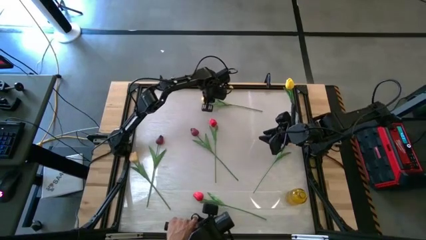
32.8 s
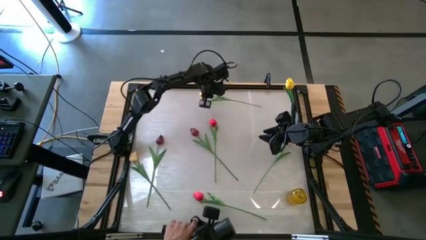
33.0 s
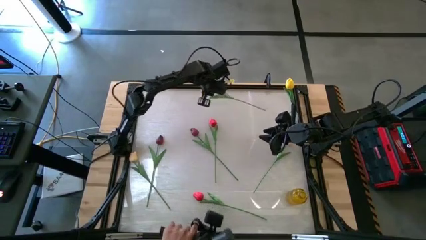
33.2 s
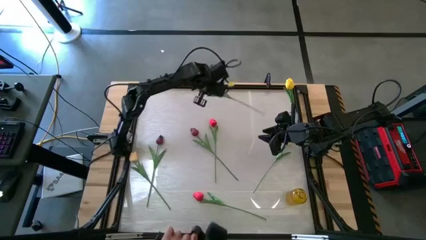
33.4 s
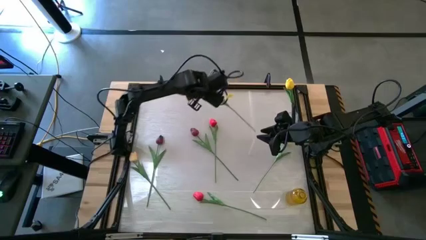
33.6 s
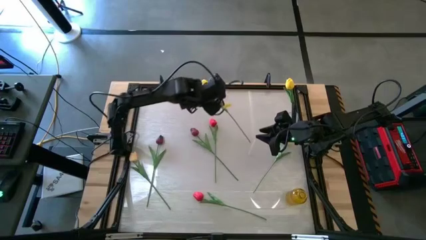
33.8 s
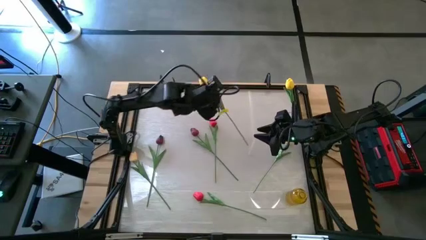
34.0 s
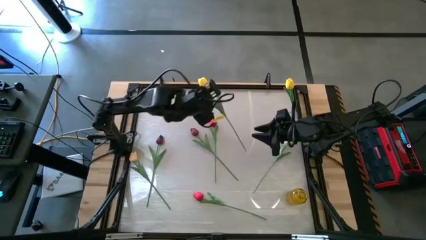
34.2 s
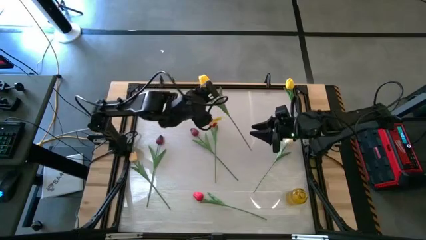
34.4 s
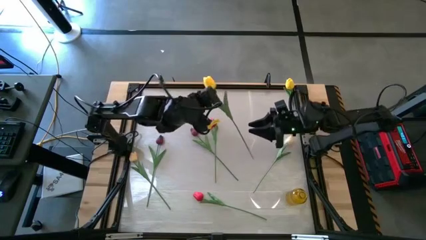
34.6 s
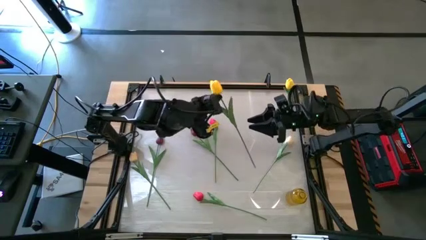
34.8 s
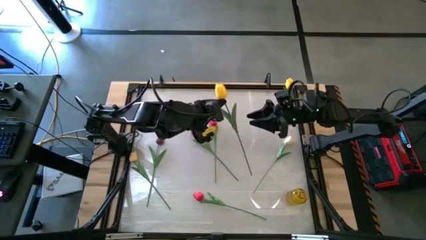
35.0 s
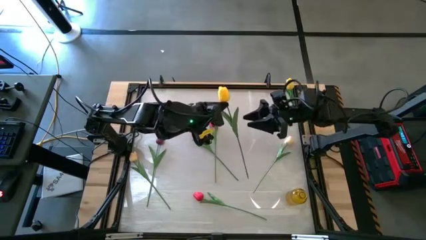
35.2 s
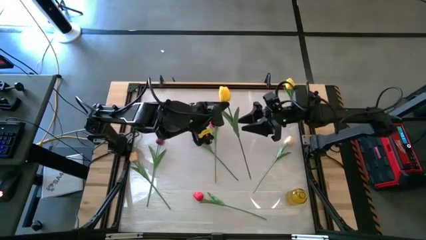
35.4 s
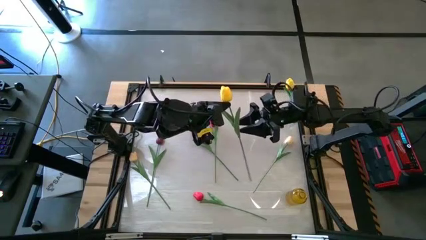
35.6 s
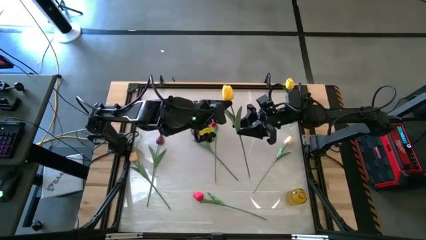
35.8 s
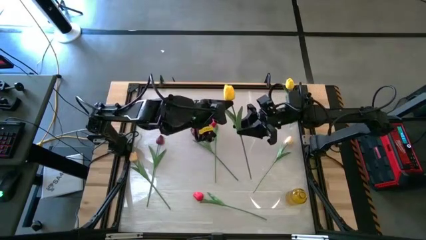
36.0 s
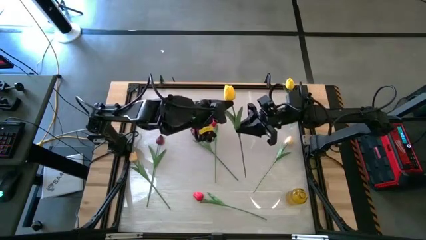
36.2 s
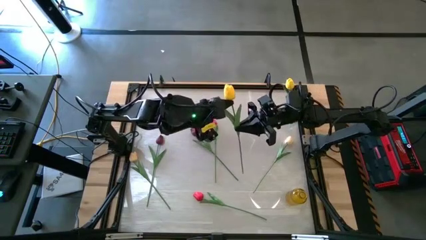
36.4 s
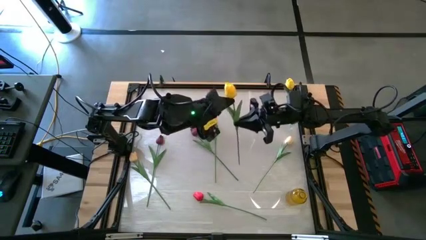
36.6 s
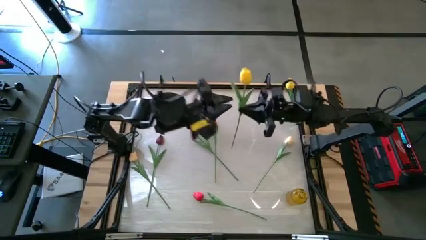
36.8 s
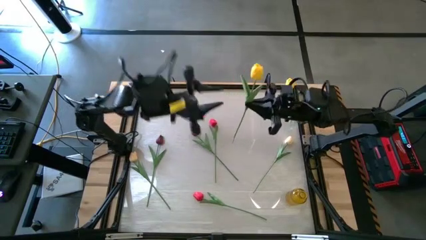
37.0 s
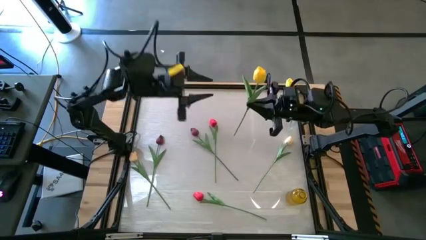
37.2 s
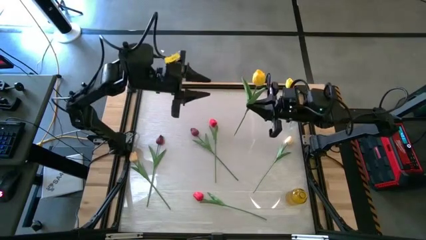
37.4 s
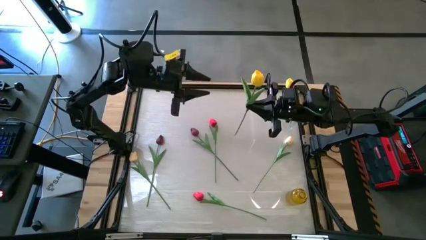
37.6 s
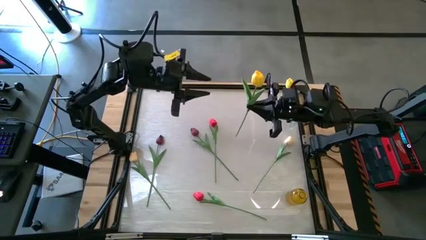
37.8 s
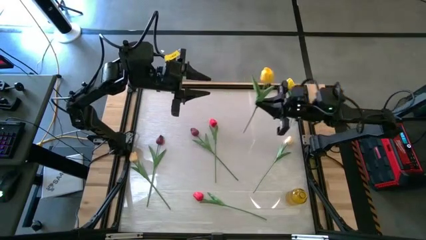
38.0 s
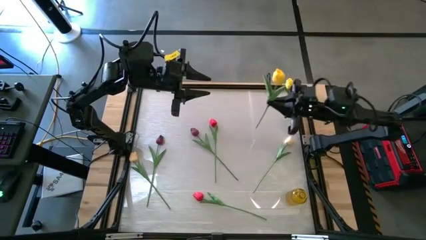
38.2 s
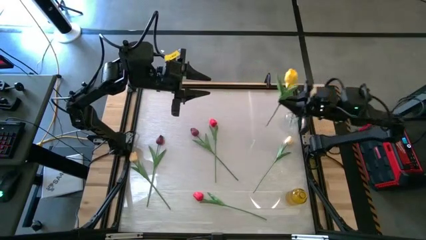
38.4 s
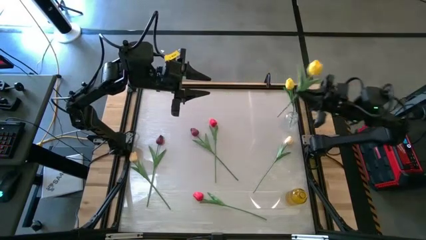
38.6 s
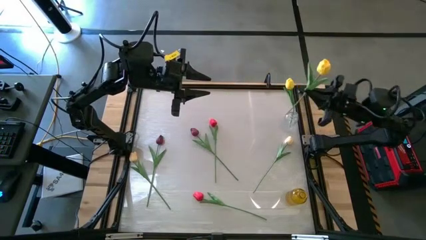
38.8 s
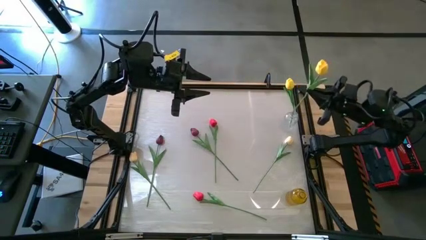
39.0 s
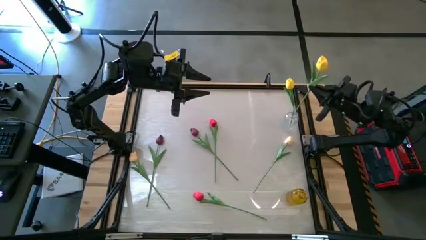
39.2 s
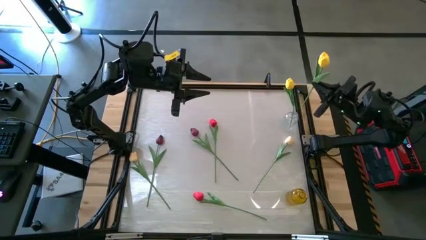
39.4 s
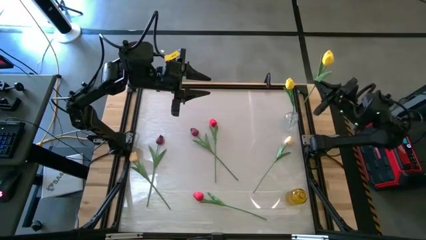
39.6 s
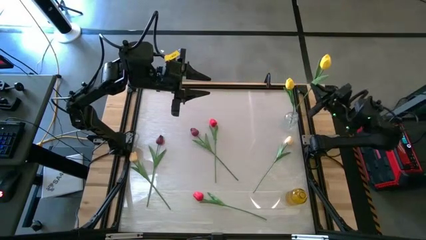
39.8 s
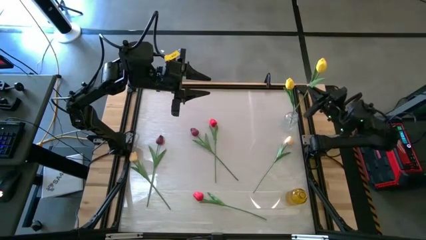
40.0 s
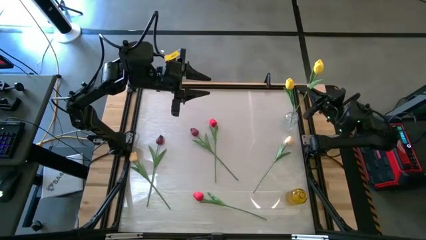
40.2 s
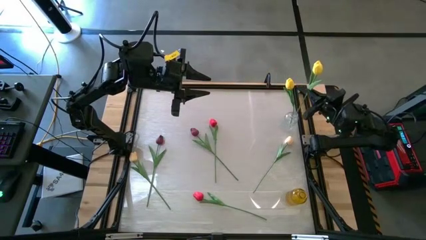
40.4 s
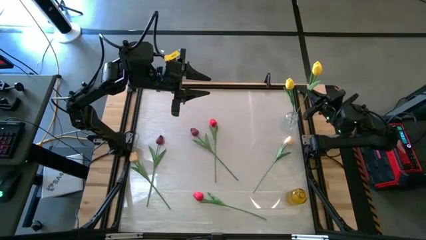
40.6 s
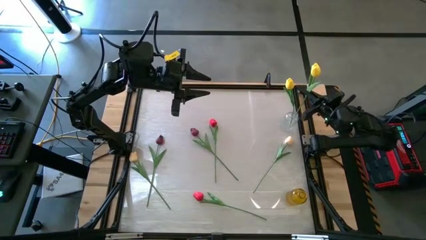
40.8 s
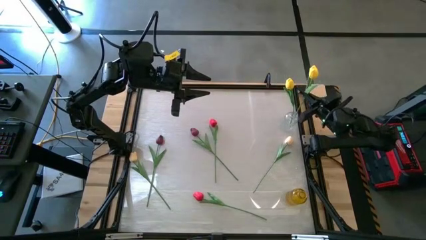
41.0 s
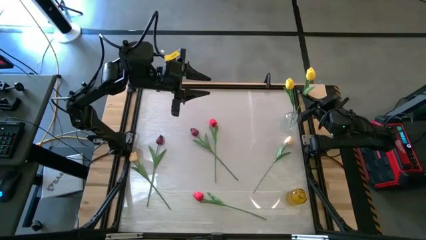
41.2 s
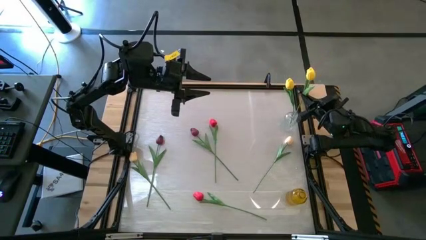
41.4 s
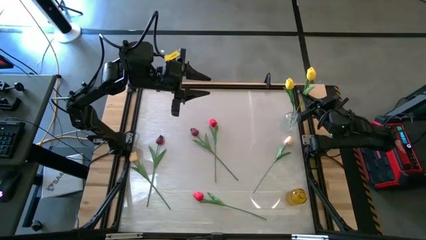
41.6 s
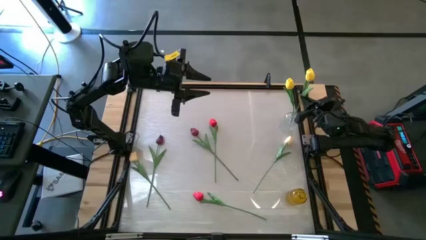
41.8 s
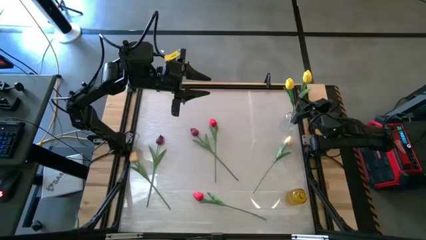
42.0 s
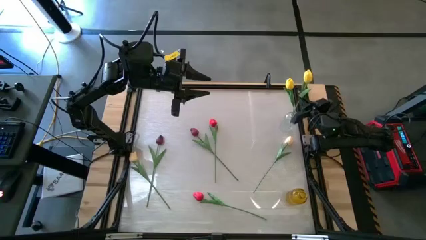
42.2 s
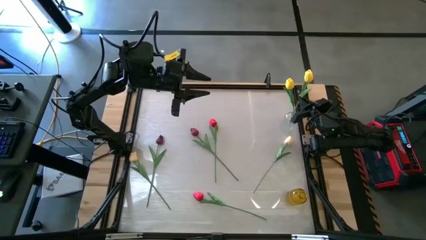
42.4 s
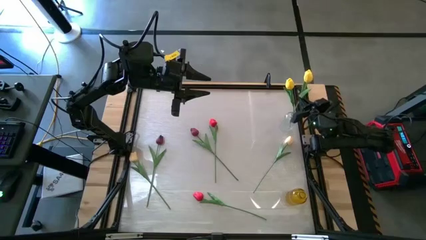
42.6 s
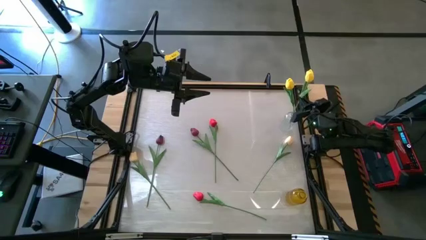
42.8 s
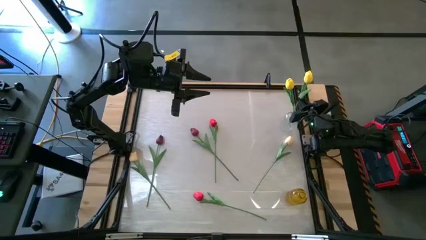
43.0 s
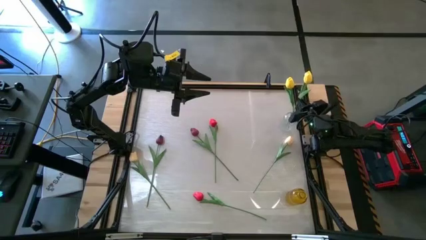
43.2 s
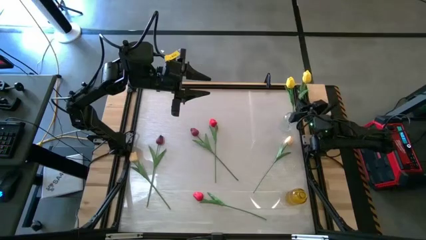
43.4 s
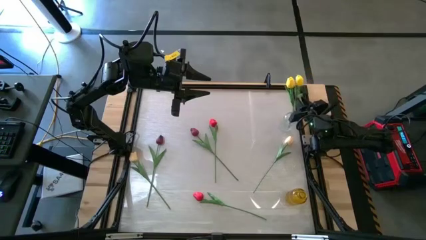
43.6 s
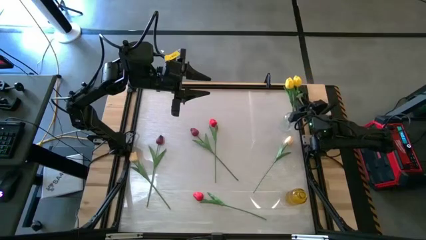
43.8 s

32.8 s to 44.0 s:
Task: Sort flowers into vase by color
Put the yellow tulip into the transparent vase
